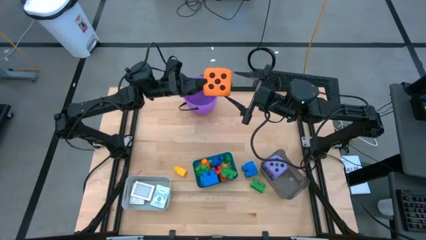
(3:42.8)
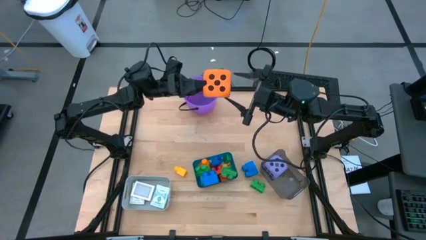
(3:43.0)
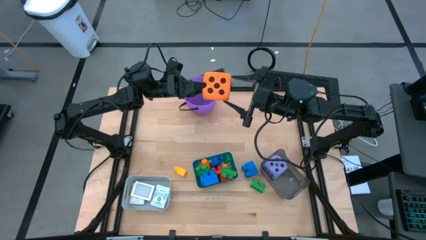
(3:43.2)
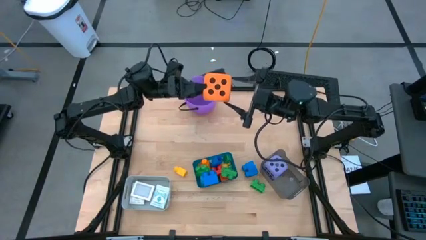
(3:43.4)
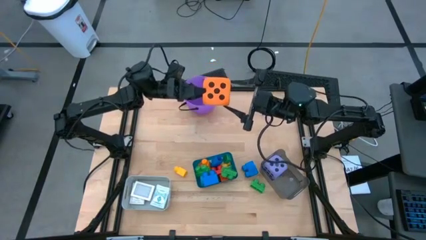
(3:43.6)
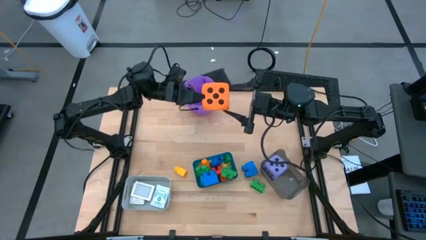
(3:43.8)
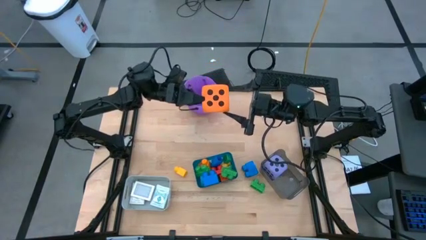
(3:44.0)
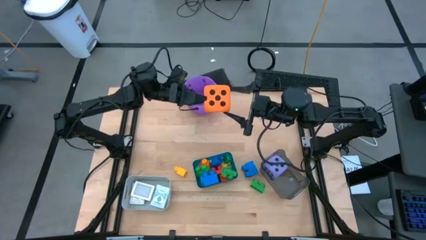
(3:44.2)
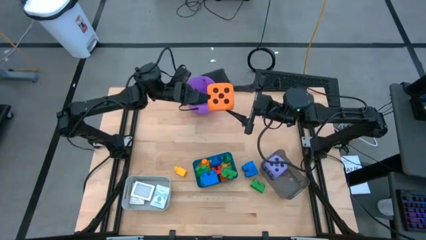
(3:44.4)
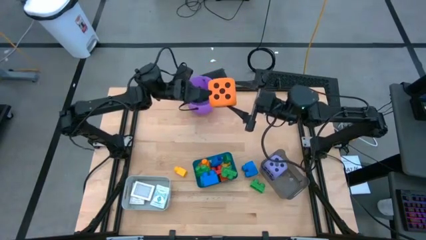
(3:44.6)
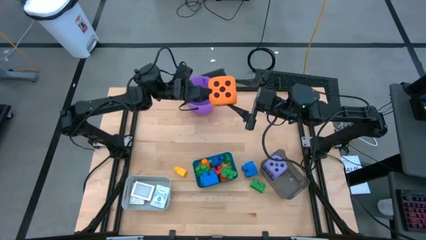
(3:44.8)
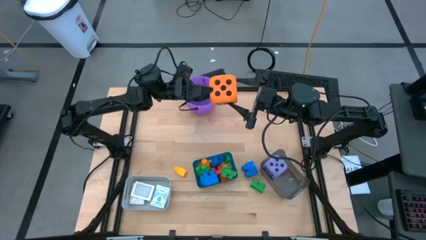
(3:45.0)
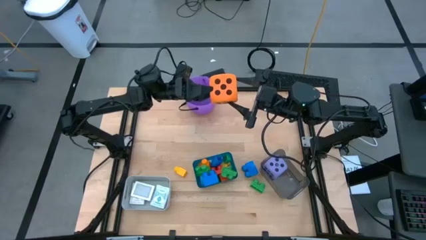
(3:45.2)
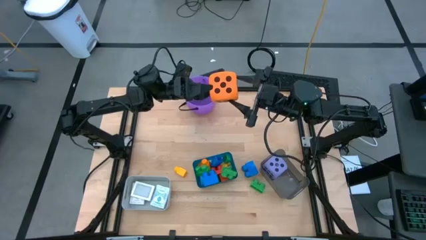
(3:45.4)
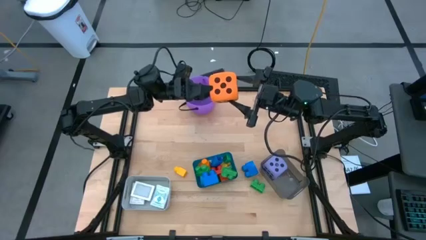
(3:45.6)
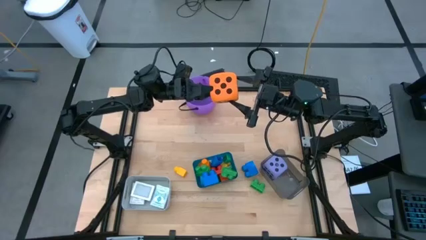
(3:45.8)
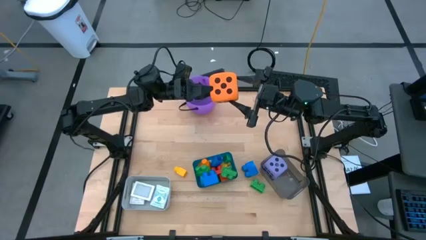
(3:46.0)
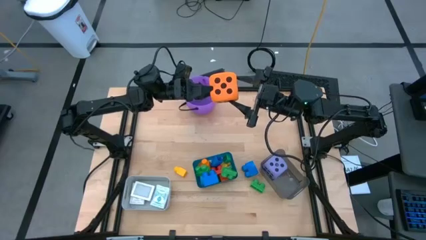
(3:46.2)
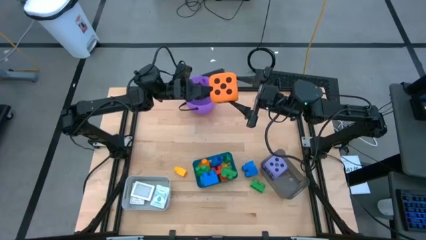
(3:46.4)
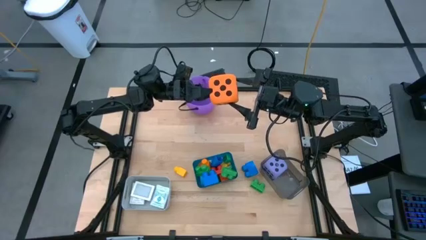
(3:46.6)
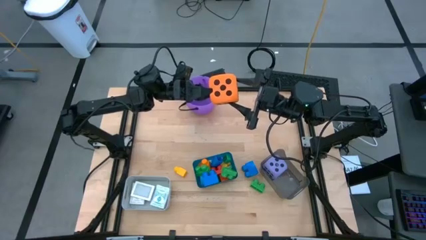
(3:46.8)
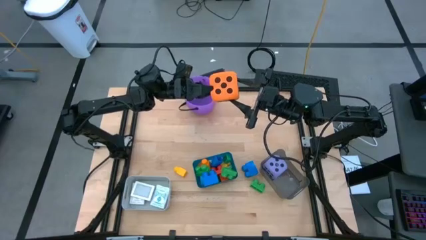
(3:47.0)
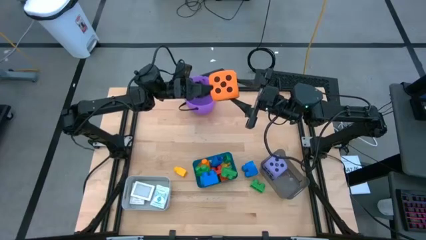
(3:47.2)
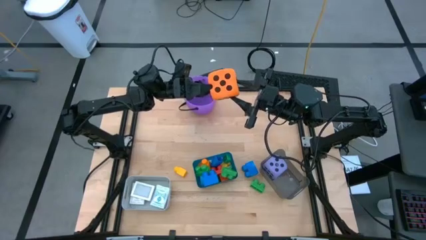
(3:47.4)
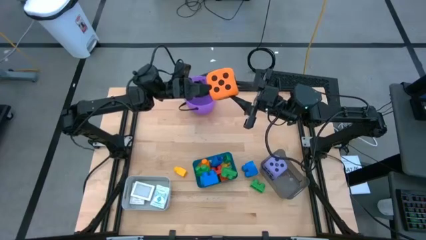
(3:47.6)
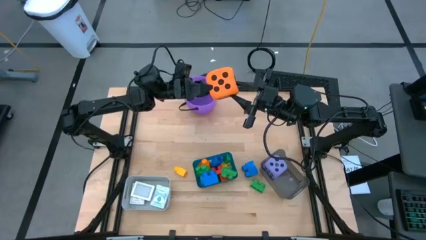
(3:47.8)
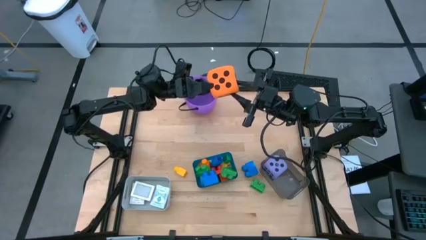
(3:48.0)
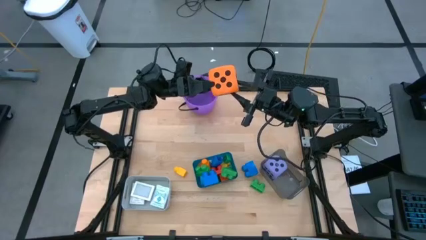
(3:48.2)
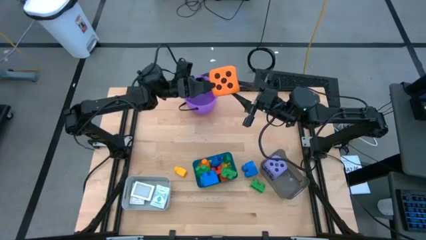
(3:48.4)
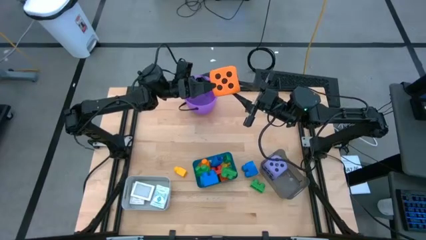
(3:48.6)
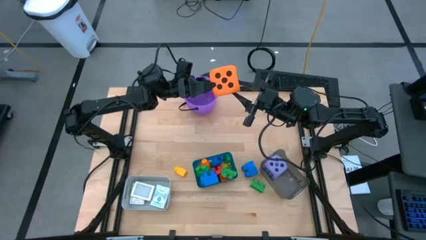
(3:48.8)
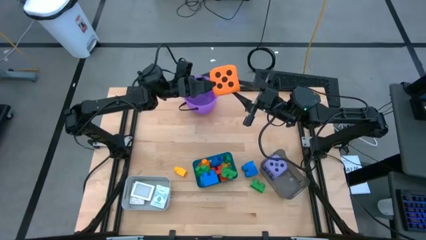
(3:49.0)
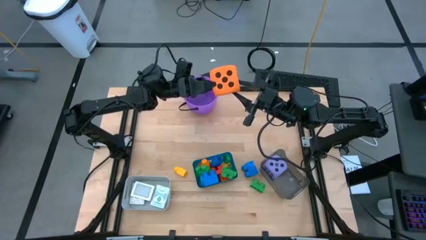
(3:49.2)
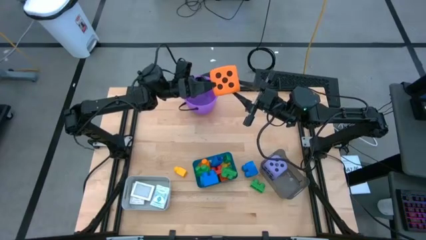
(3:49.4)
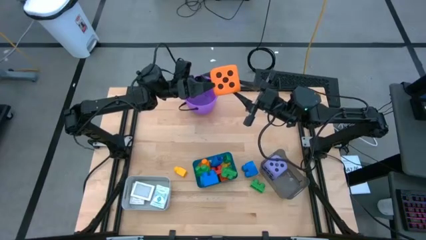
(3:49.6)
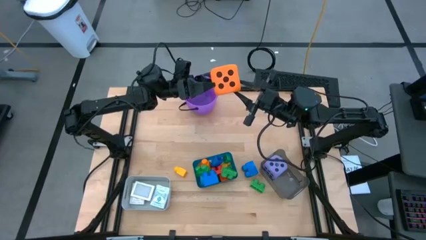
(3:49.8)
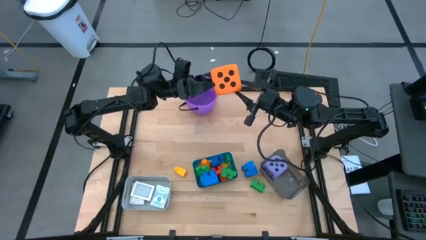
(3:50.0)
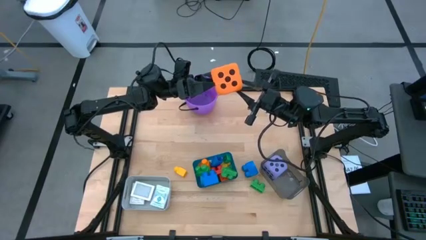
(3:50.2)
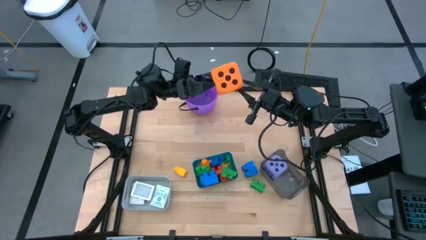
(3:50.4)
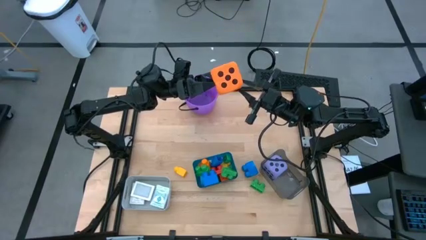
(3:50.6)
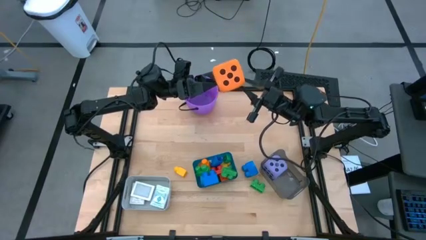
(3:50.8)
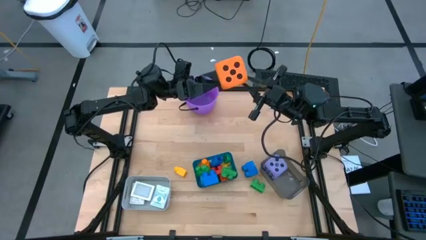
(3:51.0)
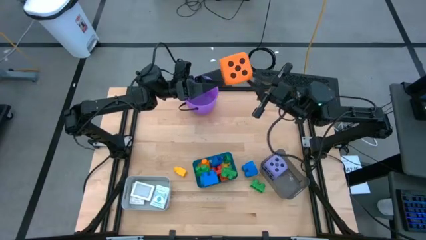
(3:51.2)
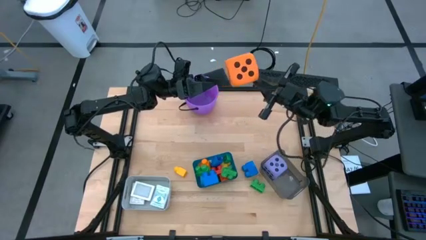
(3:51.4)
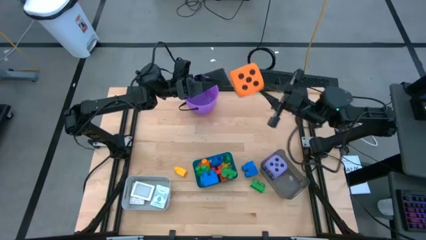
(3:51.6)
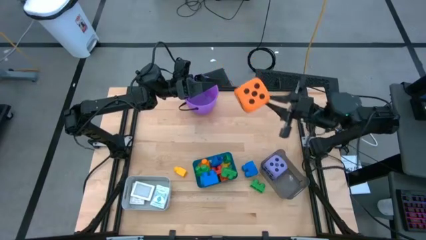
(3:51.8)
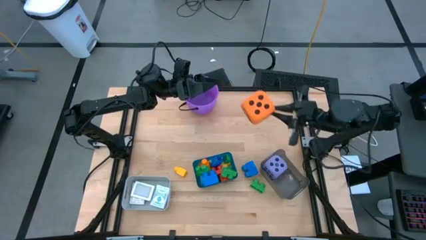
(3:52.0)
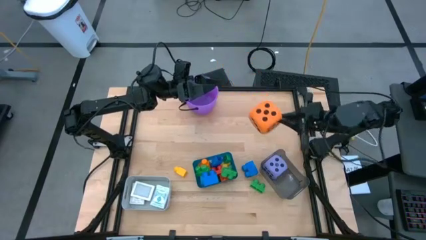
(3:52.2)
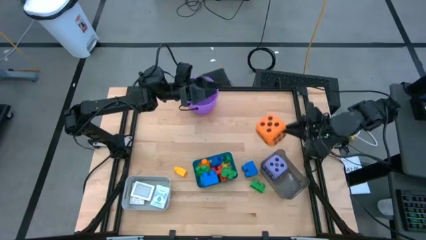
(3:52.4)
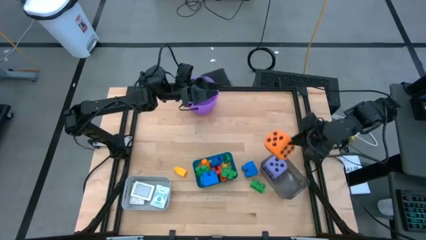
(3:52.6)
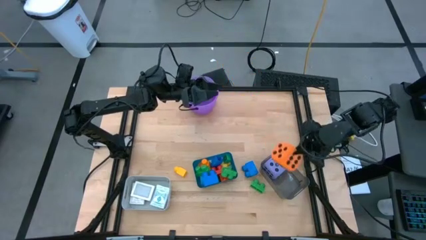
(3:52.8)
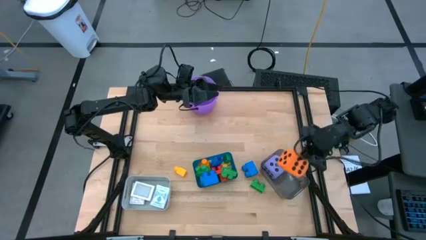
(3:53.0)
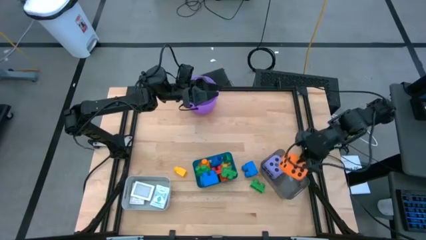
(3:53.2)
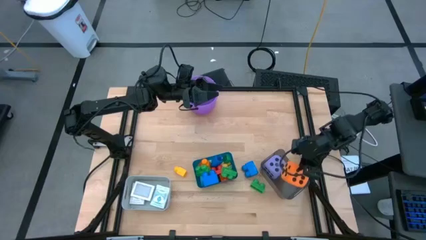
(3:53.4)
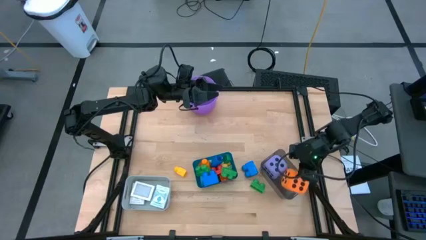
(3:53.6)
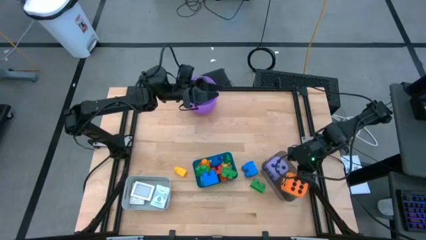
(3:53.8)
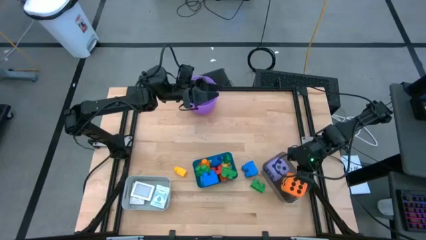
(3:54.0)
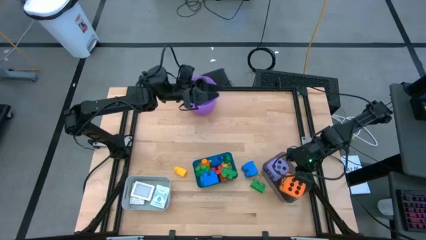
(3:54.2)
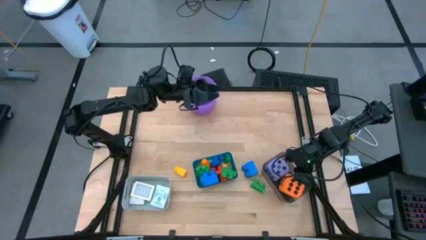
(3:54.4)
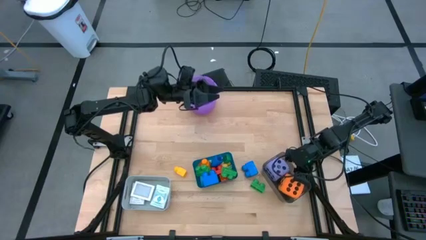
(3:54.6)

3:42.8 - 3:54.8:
Task: Pick & Place Toys
Put the orange dice into the black bin

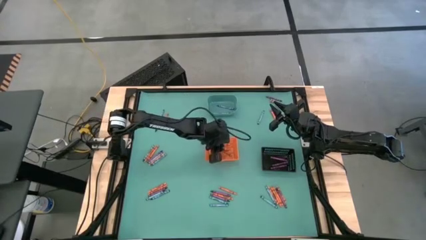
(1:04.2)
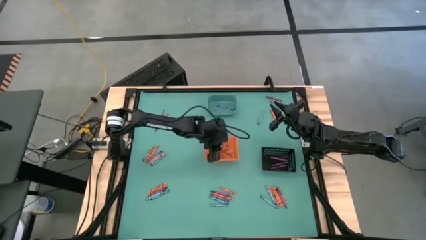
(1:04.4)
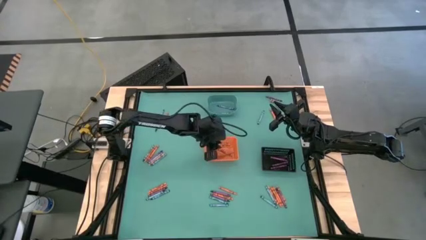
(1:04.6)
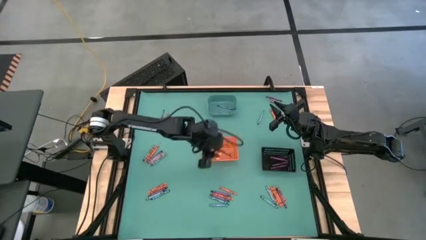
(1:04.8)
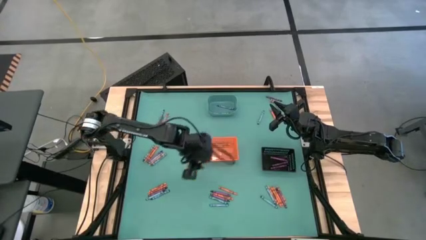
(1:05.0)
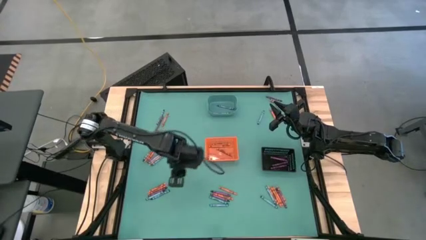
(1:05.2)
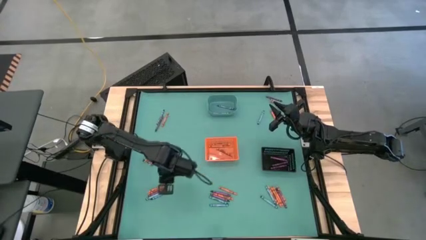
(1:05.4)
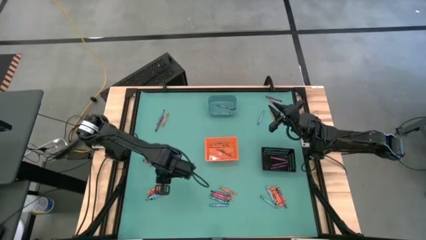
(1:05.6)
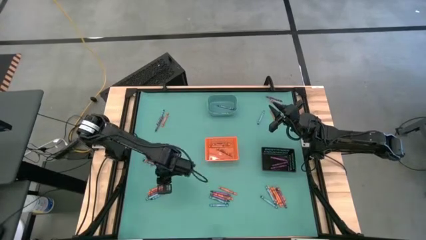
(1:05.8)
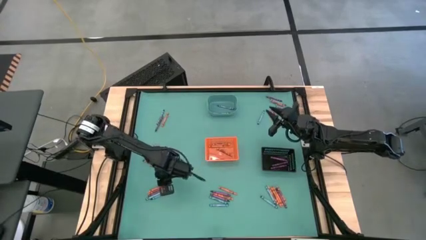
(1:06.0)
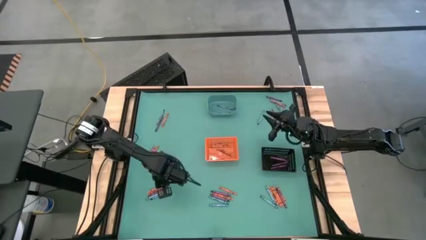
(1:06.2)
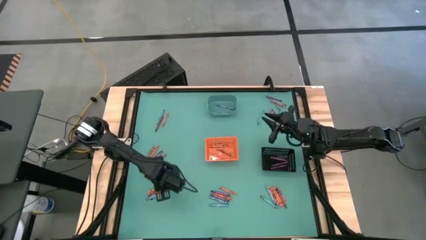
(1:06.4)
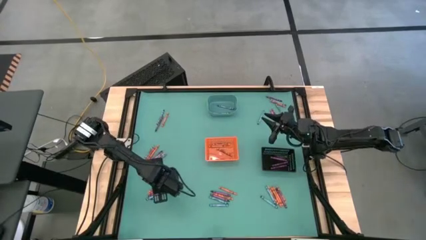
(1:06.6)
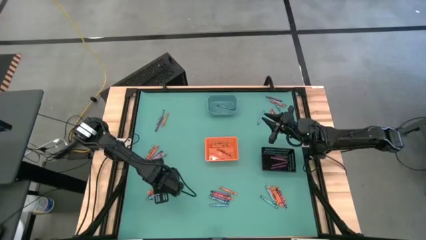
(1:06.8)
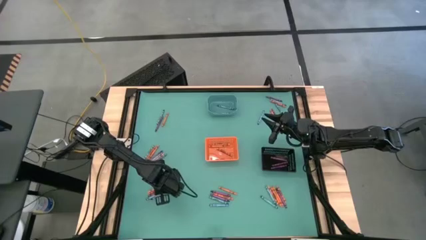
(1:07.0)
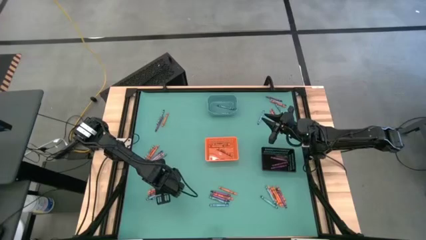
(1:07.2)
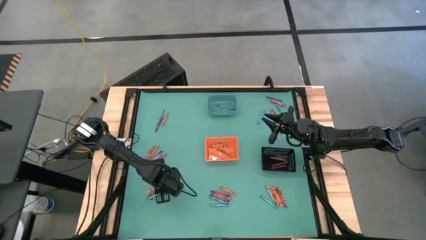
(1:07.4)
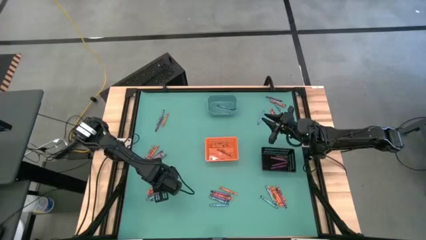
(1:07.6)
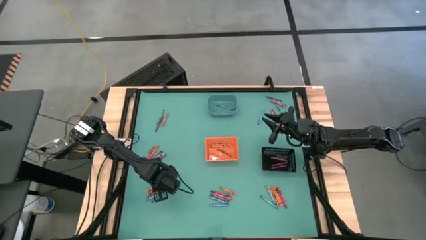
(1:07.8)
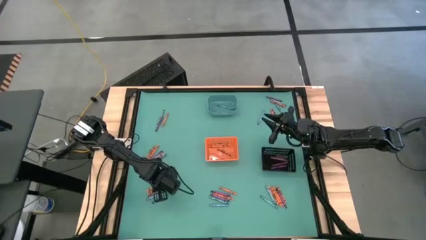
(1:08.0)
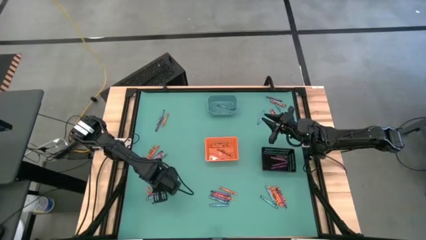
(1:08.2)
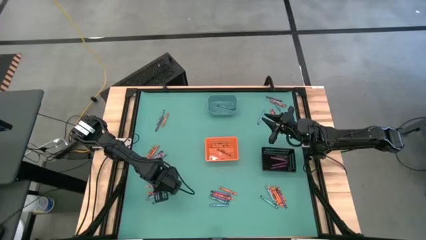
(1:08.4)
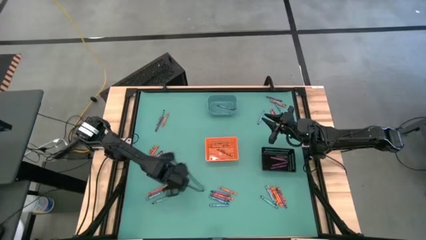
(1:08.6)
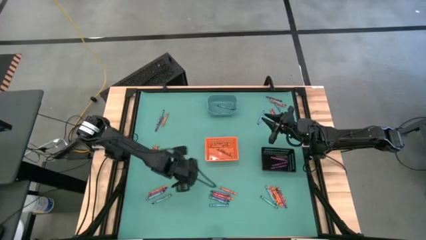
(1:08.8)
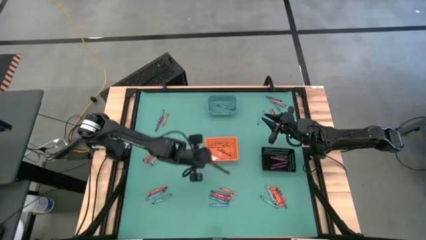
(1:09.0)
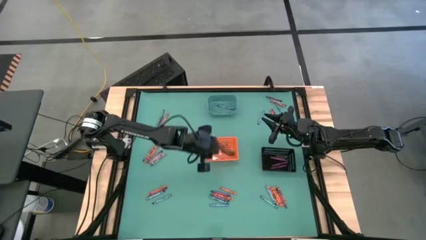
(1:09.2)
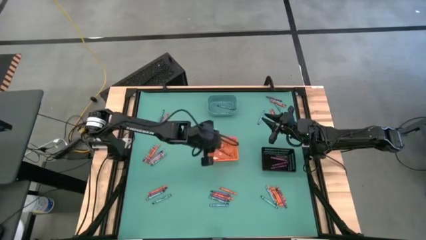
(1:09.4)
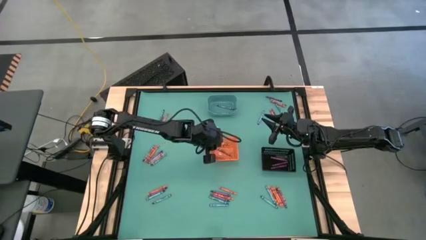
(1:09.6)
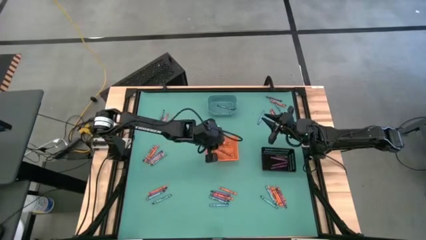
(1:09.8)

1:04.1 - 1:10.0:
Task: Sort crayons
Put the orange crayon into the orange bin
